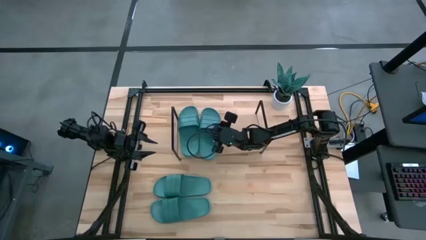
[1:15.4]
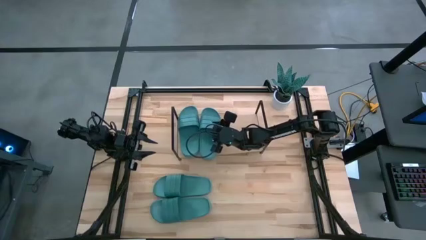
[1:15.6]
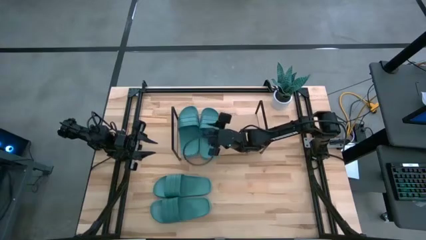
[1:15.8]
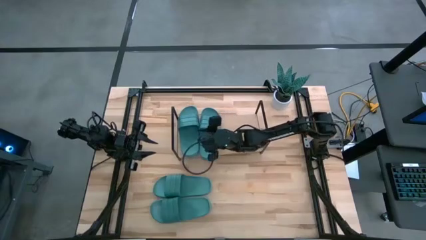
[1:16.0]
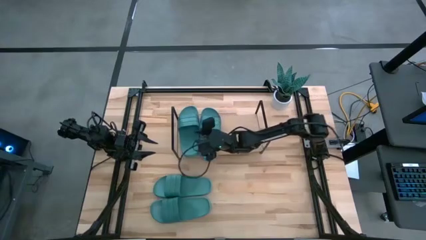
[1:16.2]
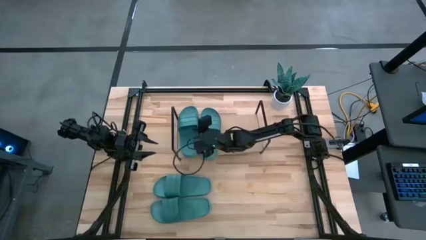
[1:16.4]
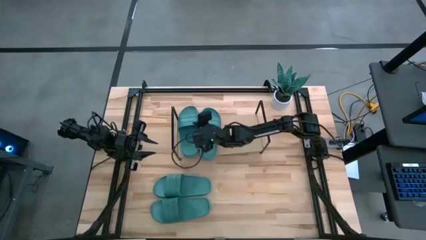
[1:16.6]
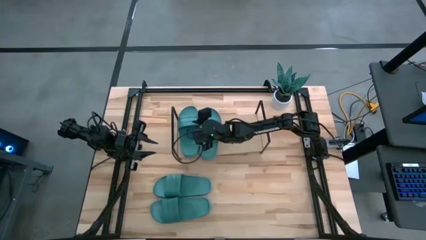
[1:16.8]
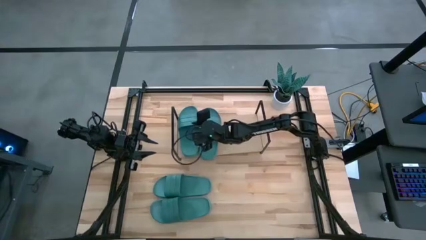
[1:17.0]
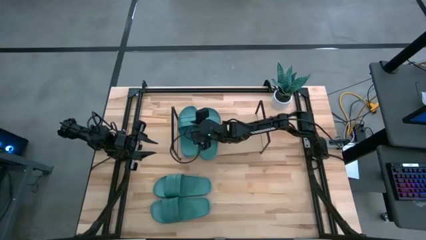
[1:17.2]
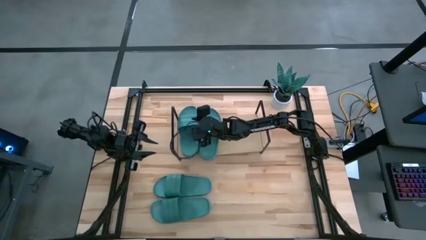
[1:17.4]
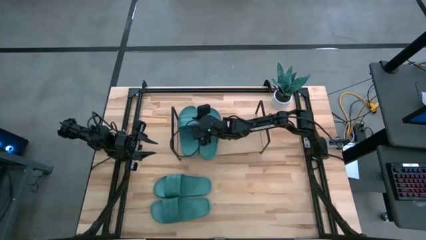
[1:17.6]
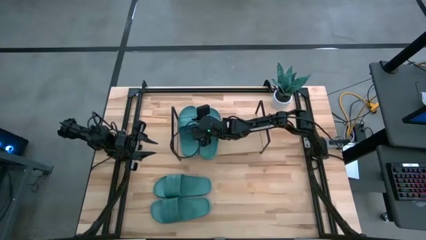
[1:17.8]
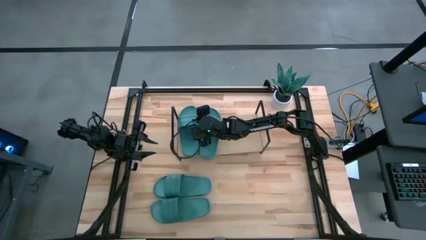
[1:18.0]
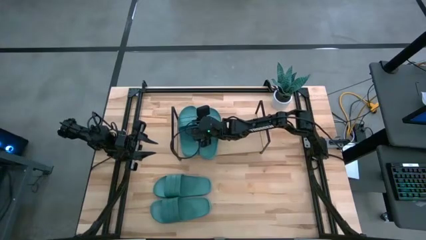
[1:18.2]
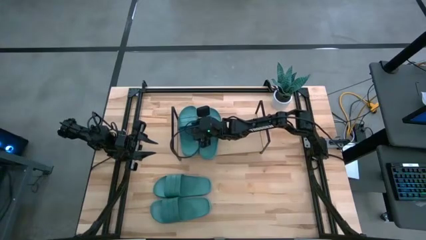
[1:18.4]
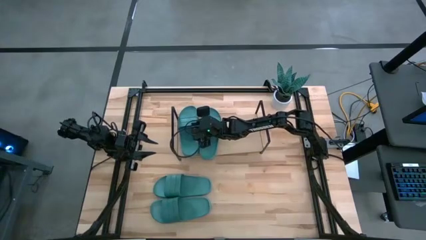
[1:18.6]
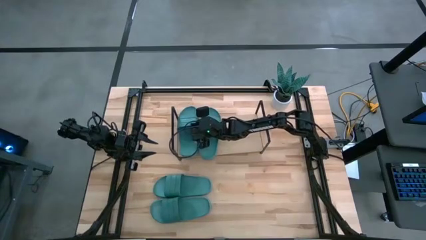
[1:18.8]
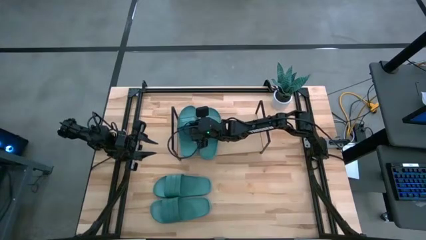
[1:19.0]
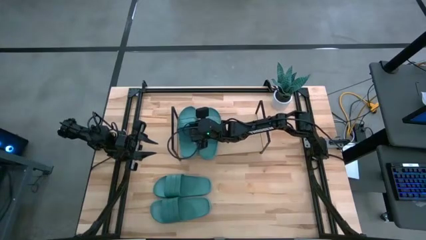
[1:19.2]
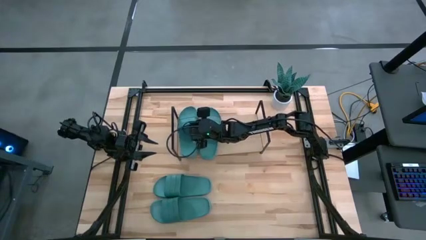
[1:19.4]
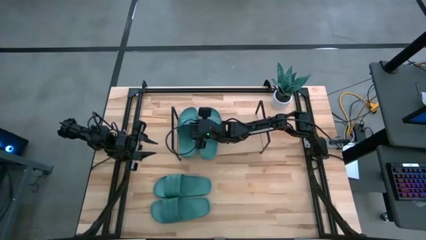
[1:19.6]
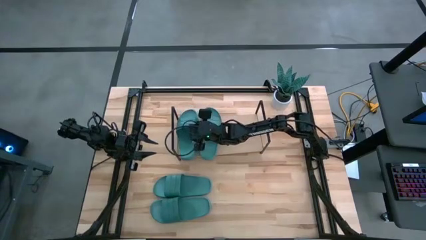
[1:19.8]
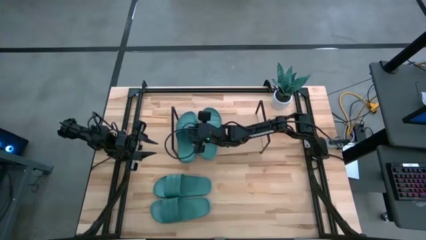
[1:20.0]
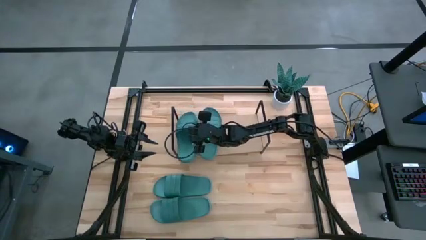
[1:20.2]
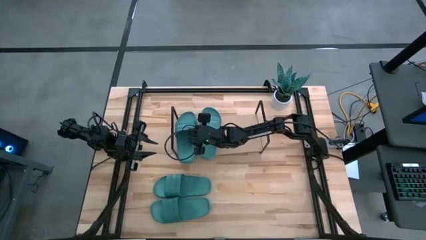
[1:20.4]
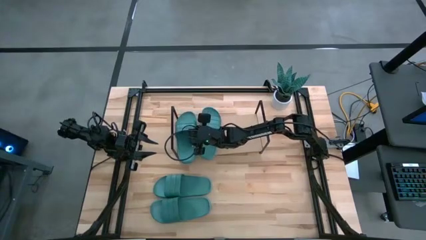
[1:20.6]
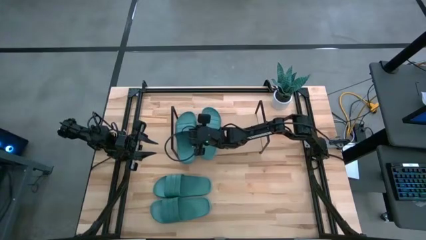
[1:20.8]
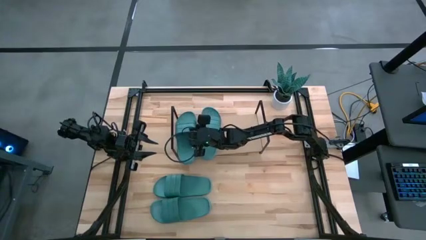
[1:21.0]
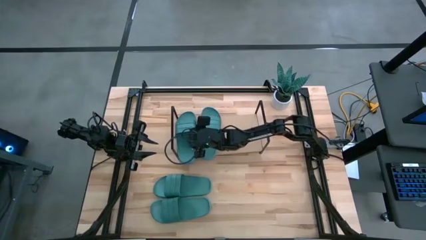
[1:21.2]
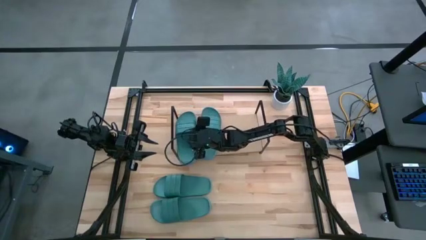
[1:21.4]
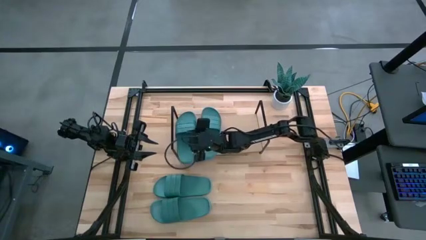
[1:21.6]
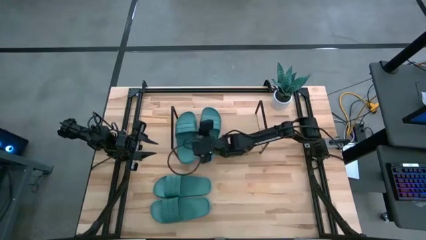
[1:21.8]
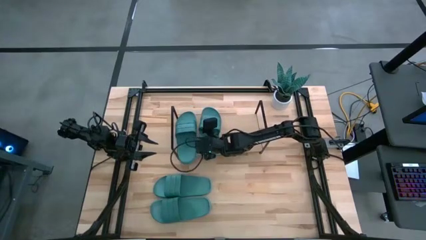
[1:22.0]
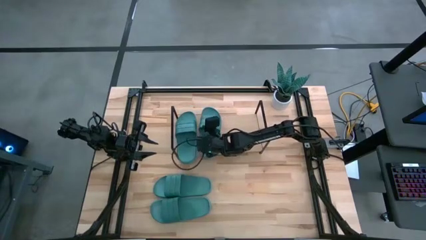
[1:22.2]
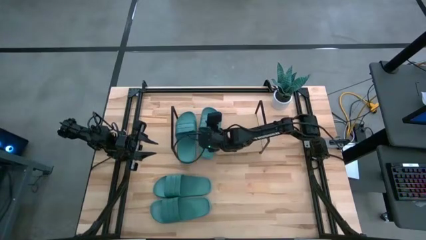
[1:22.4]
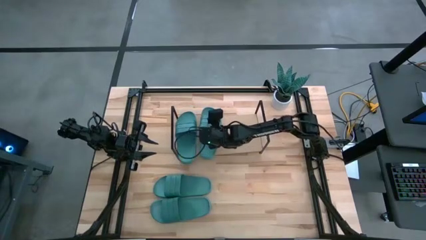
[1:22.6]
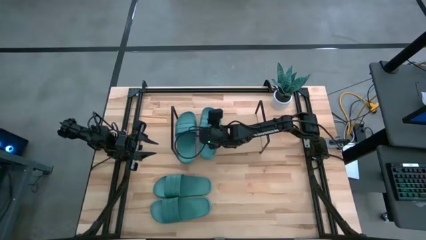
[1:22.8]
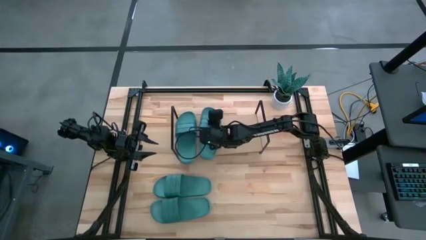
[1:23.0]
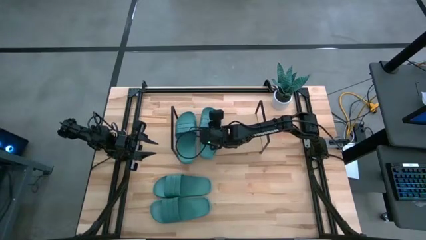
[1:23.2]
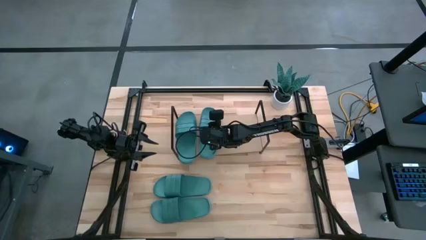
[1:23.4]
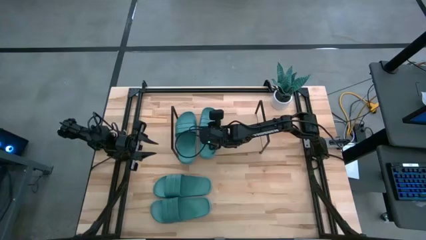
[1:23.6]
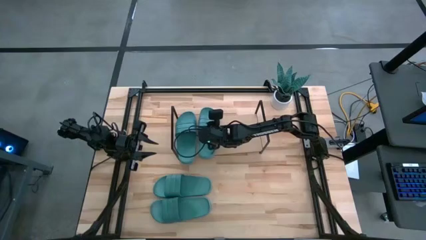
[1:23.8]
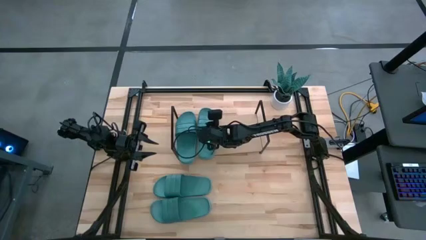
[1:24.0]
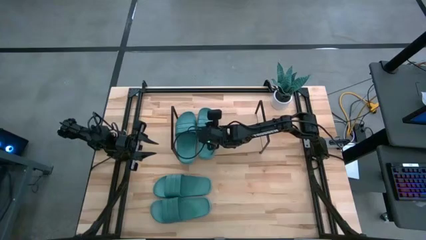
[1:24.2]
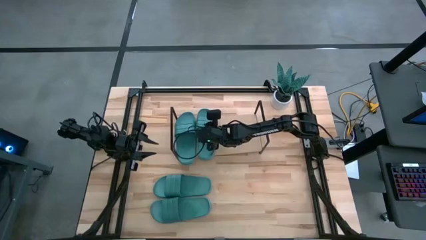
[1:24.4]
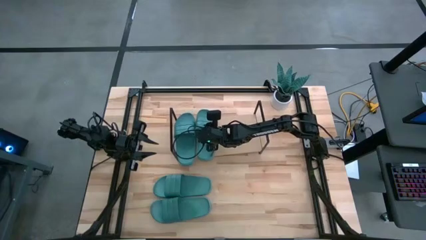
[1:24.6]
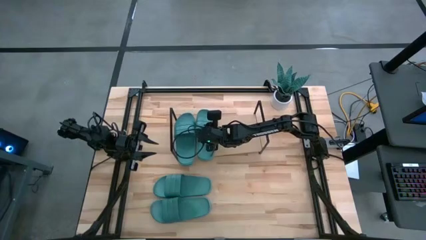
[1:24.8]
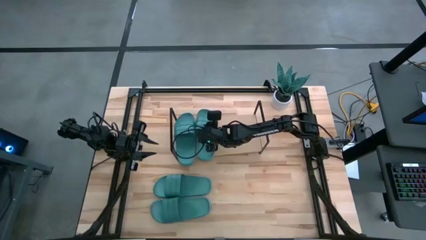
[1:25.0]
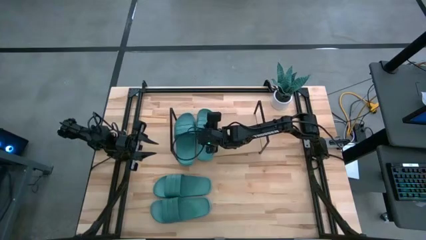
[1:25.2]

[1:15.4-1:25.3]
Task: Pick and place slides into the shelf
Adjust the green slippers

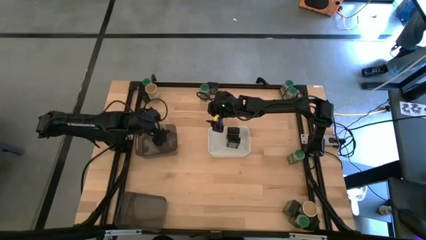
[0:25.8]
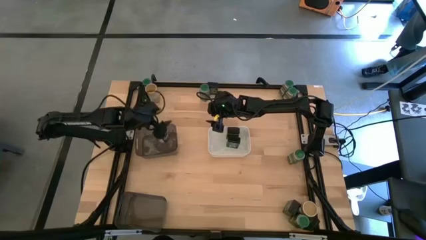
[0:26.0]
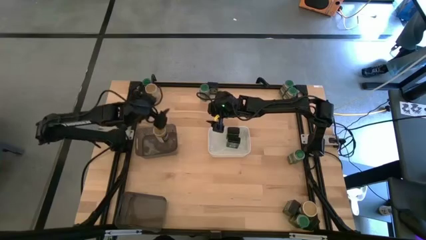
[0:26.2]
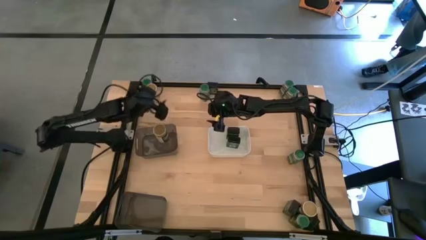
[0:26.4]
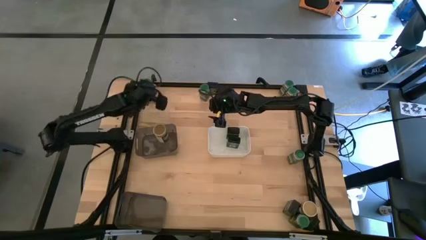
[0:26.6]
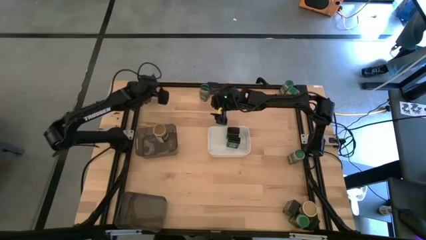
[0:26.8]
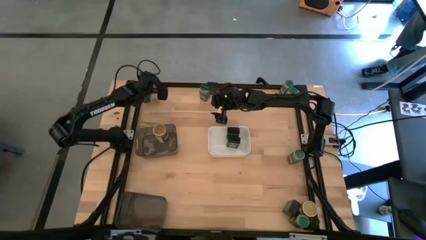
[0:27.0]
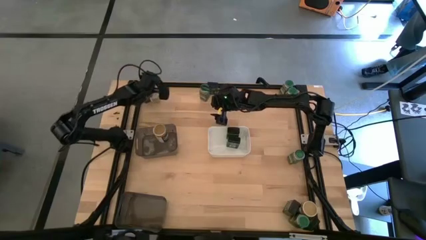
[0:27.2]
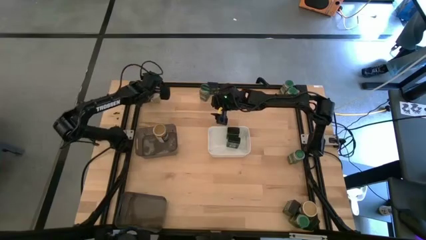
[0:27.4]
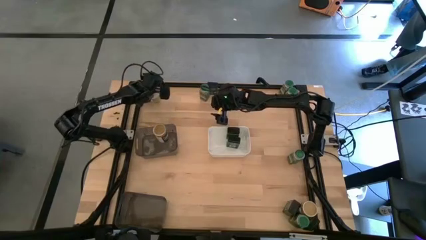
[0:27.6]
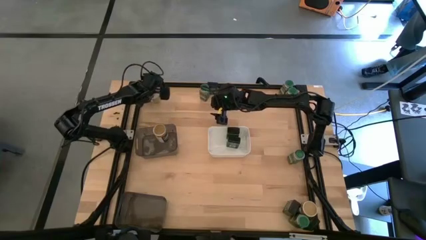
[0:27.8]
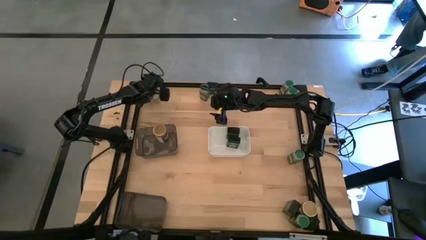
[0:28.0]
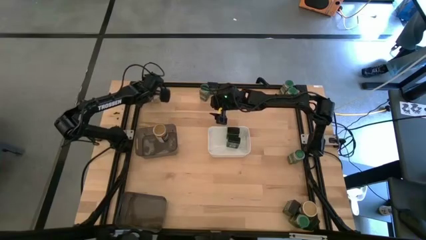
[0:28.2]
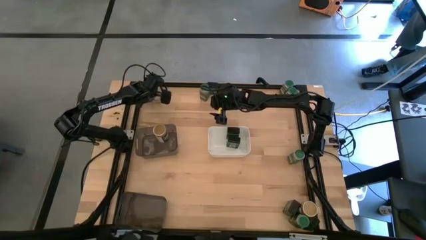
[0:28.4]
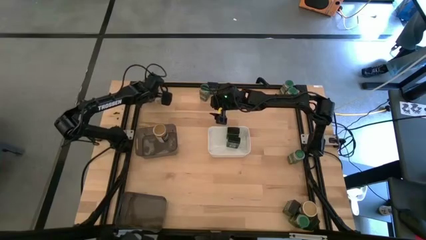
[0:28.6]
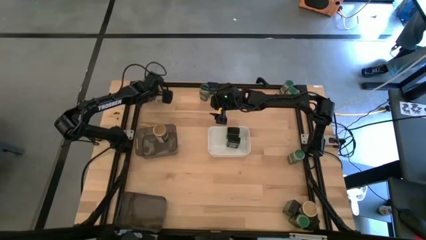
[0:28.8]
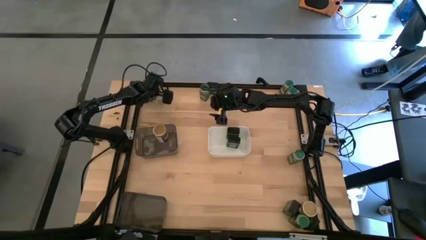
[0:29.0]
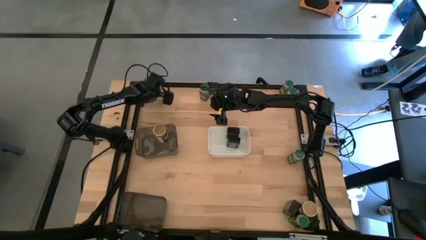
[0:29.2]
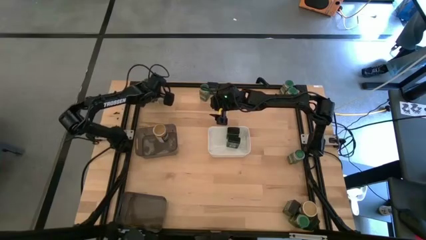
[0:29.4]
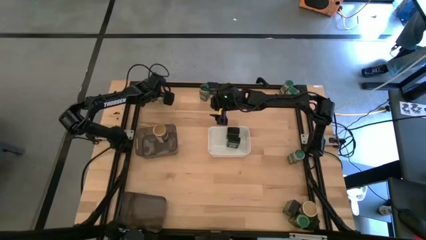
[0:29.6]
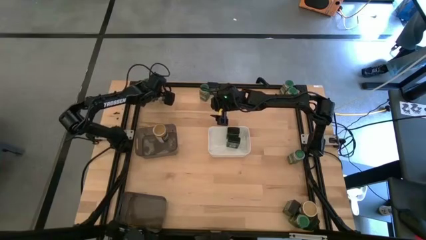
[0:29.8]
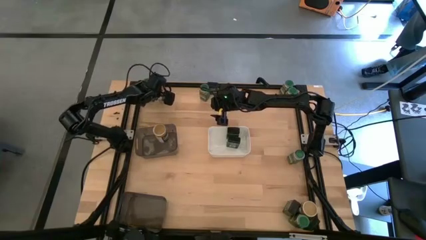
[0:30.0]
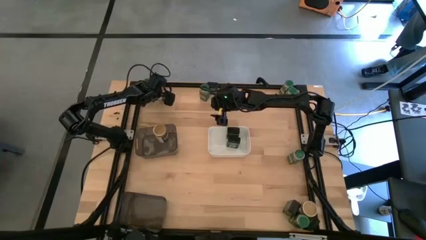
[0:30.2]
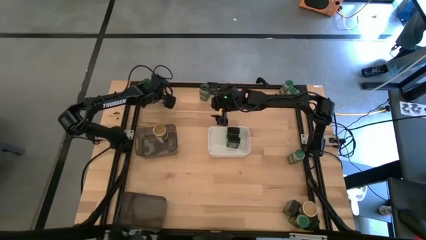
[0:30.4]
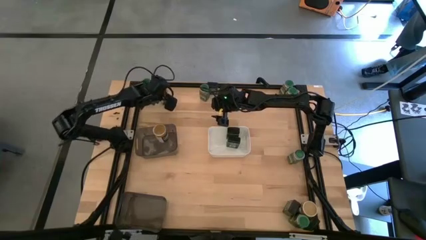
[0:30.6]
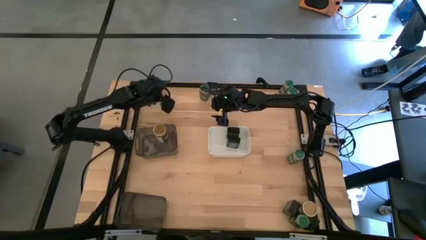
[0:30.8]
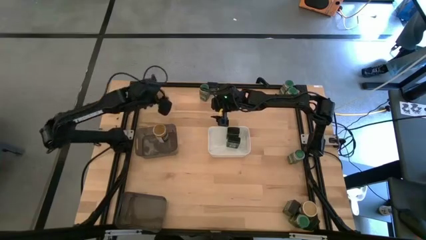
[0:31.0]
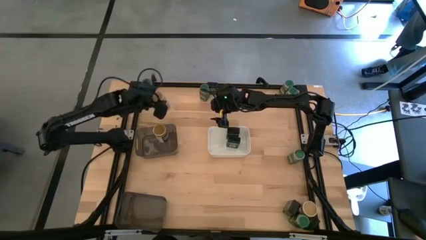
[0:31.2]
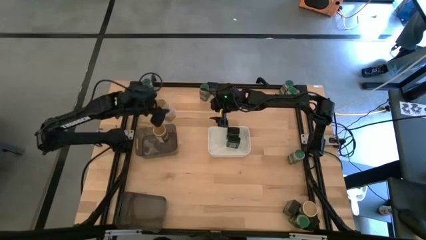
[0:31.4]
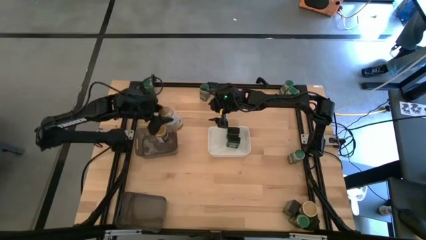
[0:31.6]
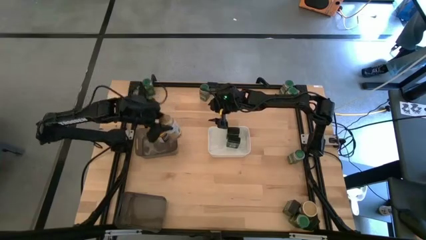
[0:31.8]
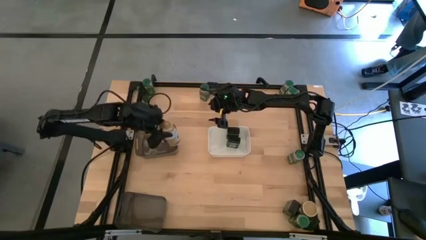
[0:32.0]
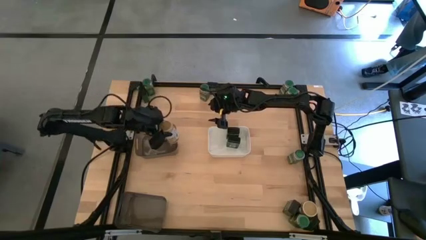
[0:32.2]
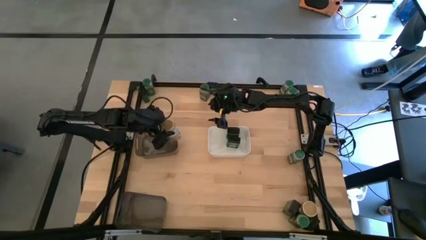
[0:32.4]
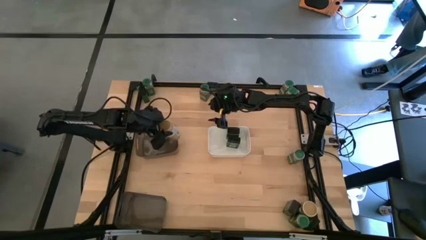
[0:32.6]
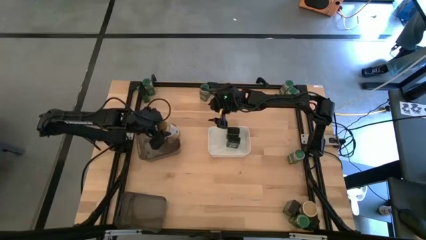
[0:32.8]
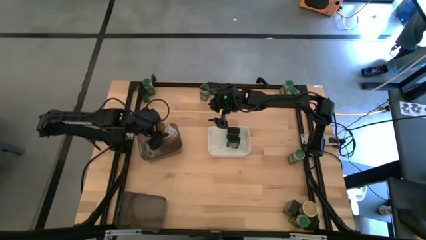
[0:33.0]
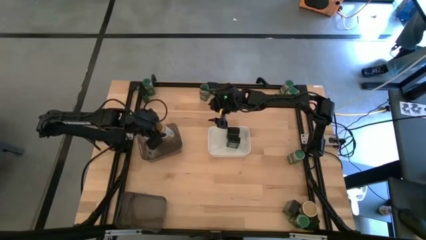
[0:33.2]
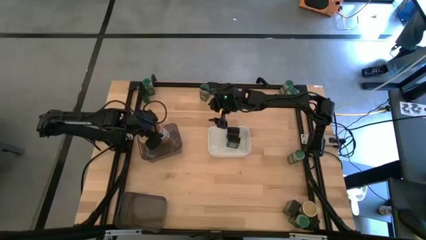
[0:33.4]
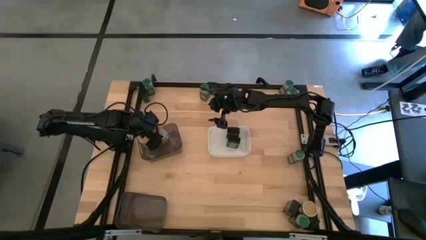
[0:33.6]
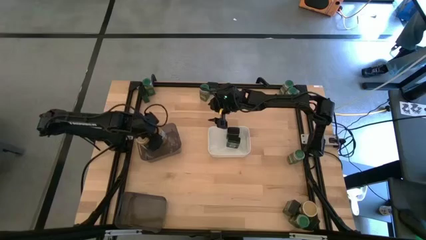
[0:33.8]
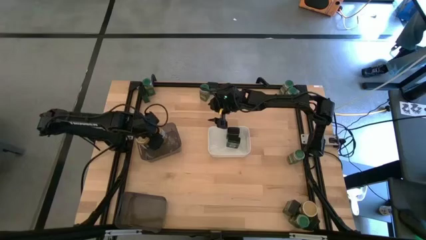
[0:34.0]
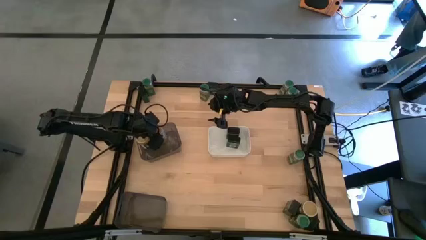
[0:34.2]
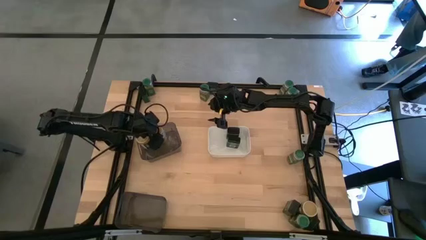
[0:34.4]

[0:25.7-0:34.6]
Task: Sort spices by type
Put the gold seasoning bottle into the top black bin
